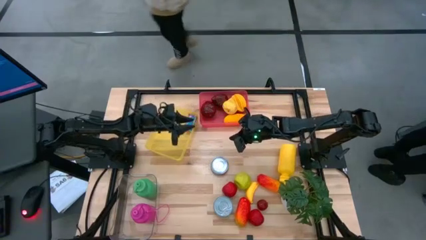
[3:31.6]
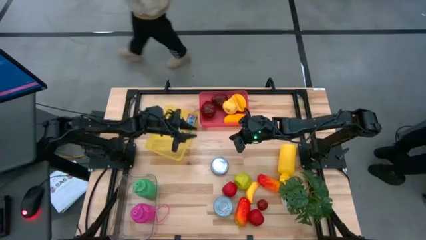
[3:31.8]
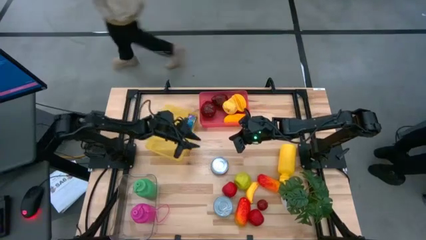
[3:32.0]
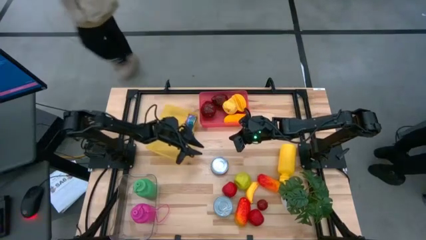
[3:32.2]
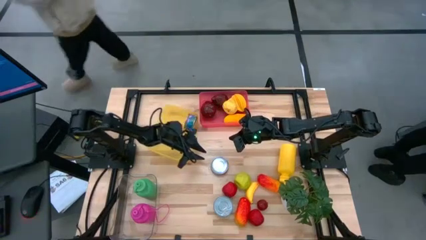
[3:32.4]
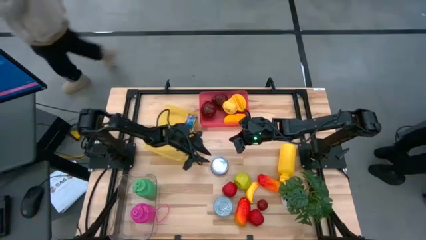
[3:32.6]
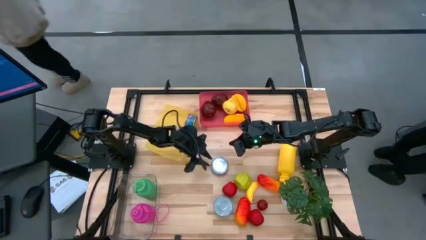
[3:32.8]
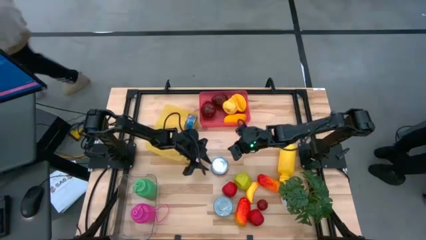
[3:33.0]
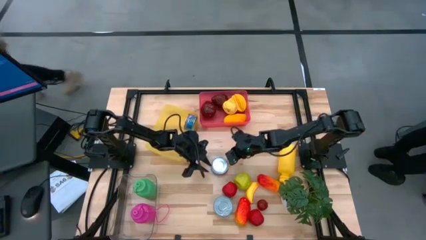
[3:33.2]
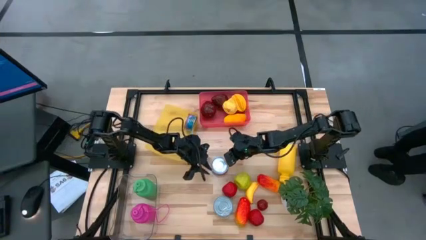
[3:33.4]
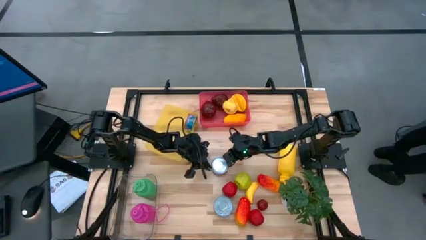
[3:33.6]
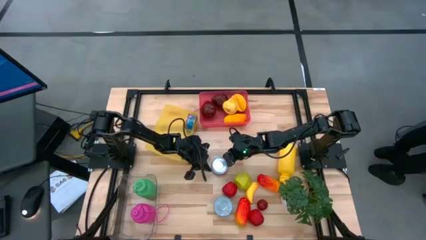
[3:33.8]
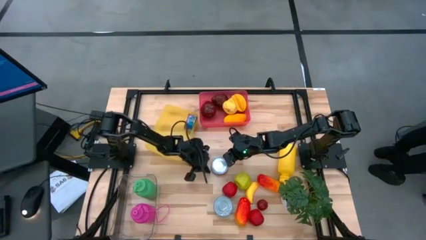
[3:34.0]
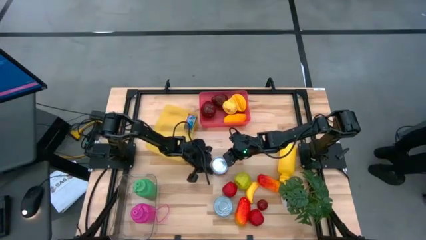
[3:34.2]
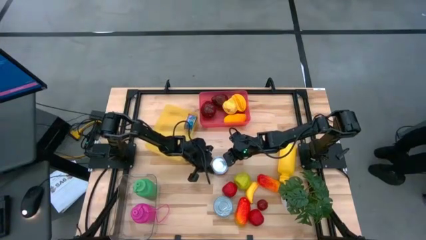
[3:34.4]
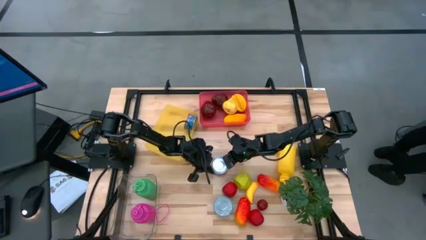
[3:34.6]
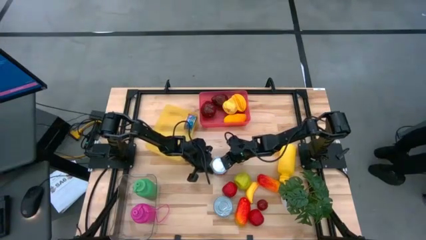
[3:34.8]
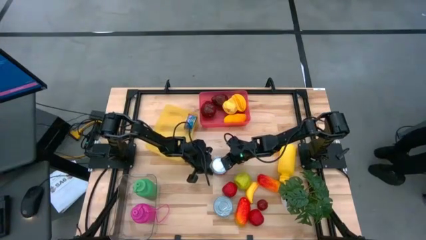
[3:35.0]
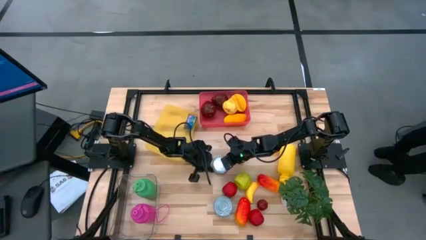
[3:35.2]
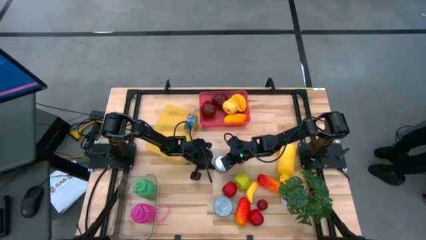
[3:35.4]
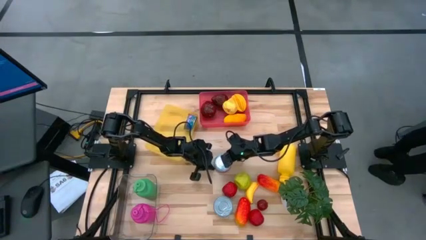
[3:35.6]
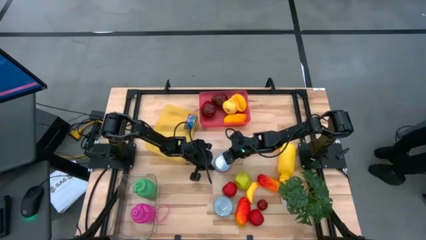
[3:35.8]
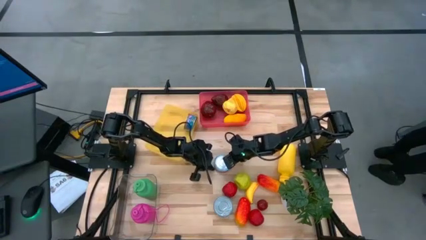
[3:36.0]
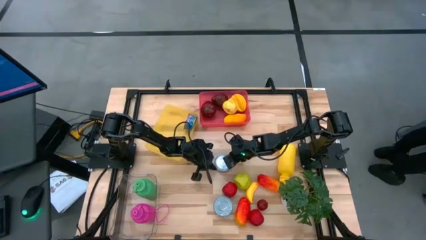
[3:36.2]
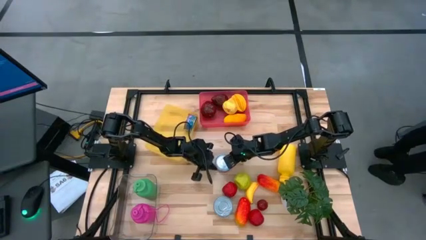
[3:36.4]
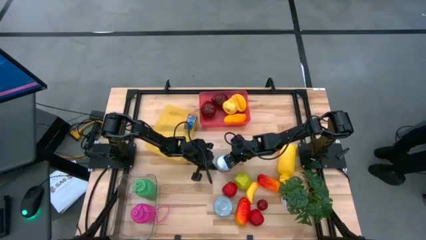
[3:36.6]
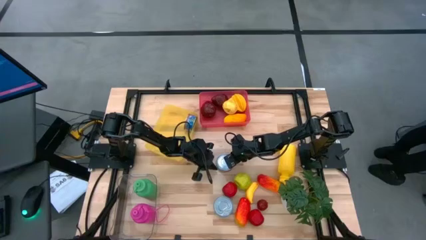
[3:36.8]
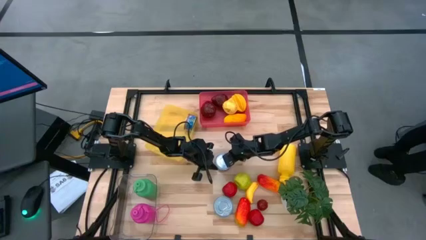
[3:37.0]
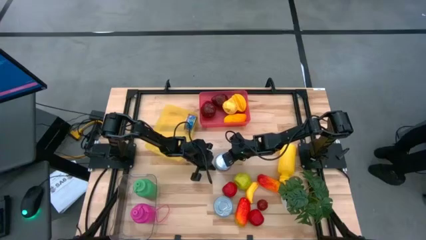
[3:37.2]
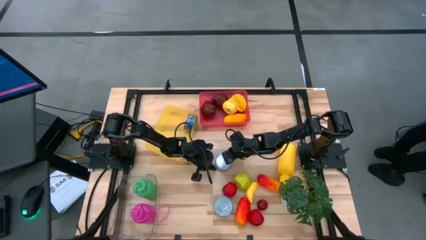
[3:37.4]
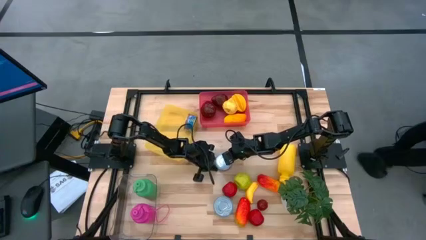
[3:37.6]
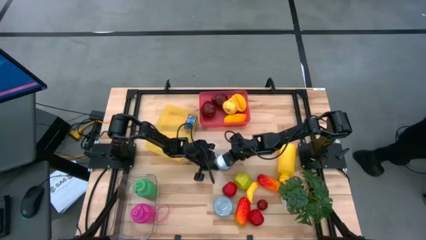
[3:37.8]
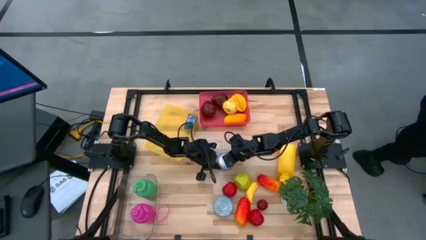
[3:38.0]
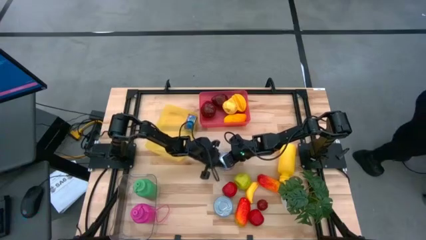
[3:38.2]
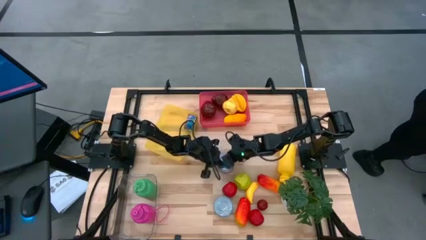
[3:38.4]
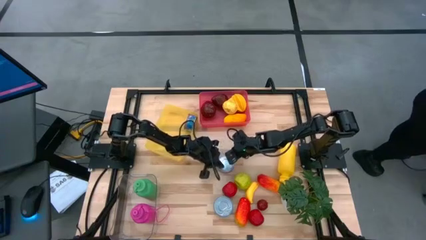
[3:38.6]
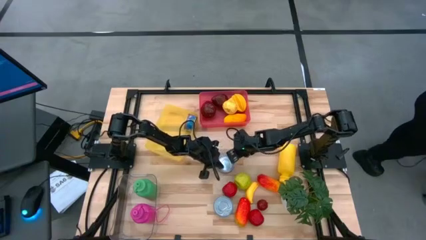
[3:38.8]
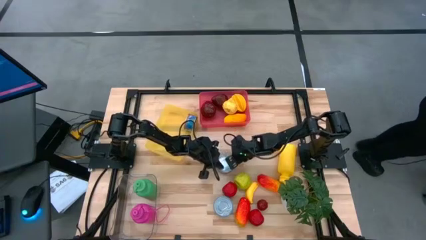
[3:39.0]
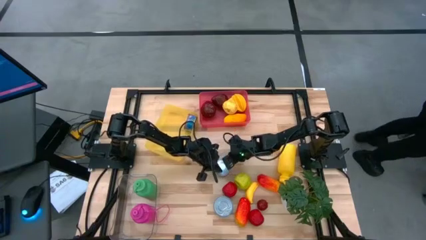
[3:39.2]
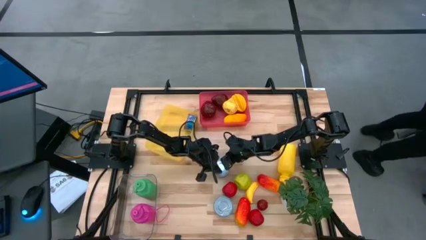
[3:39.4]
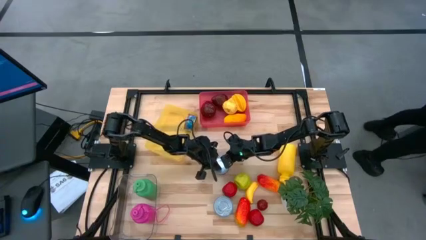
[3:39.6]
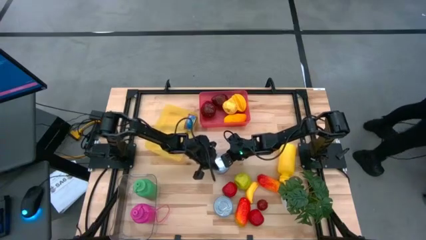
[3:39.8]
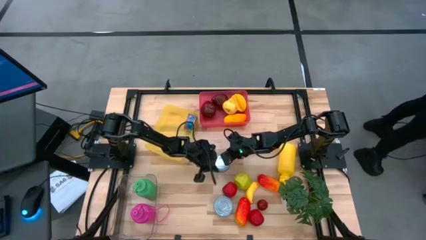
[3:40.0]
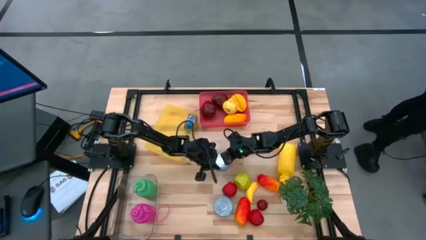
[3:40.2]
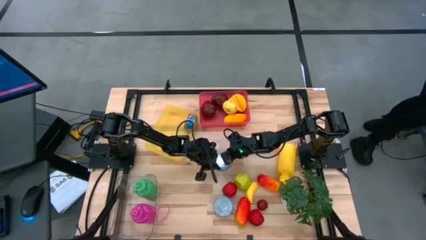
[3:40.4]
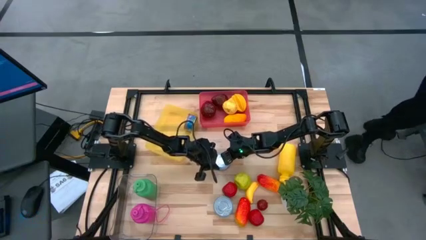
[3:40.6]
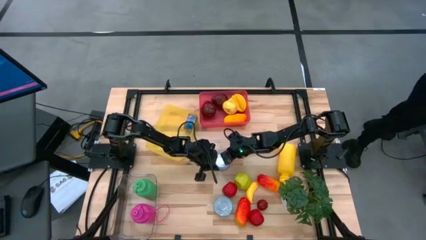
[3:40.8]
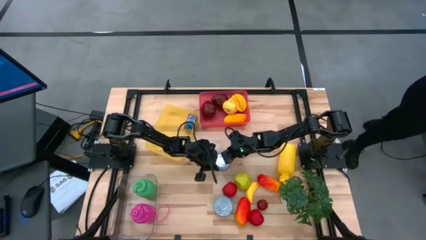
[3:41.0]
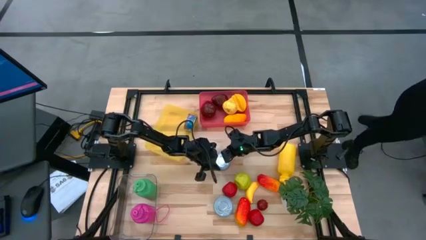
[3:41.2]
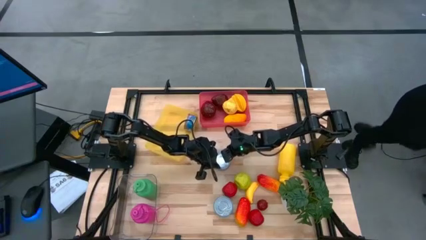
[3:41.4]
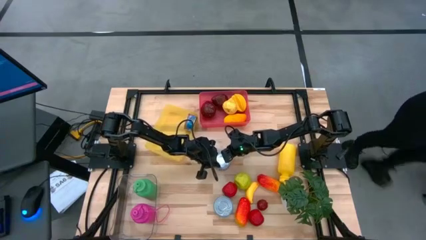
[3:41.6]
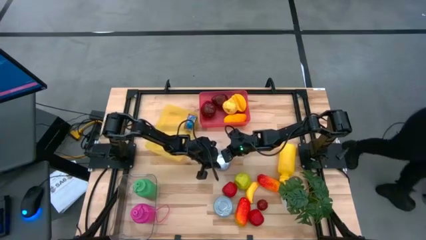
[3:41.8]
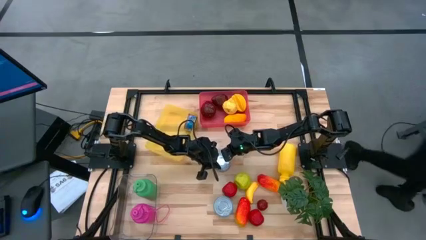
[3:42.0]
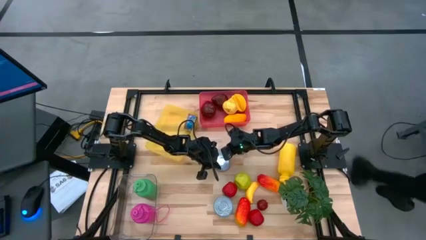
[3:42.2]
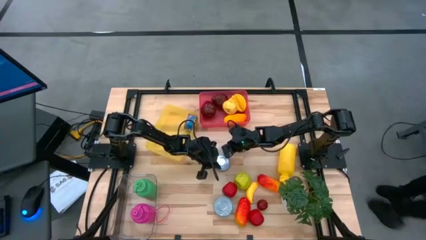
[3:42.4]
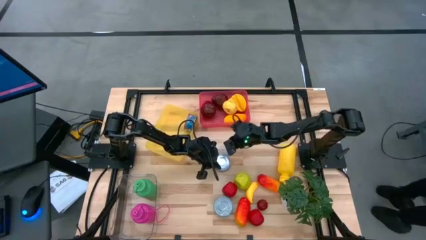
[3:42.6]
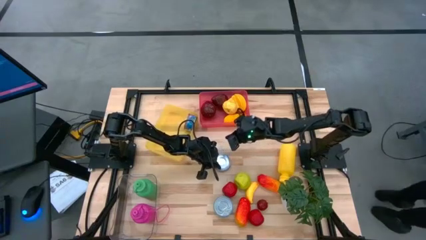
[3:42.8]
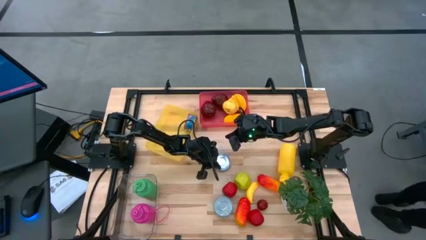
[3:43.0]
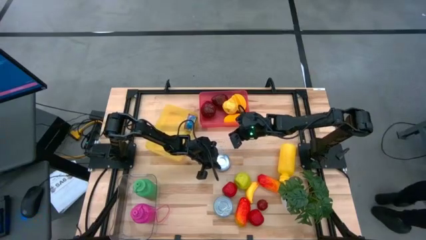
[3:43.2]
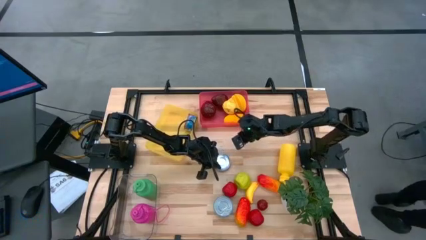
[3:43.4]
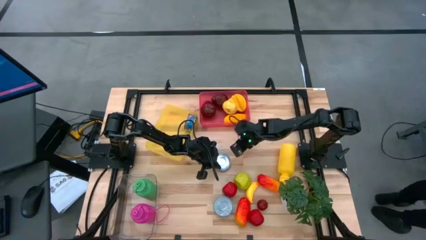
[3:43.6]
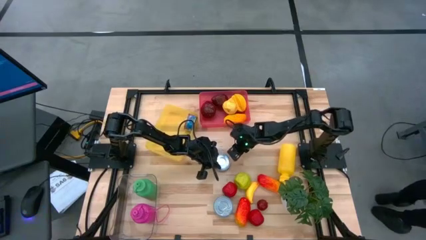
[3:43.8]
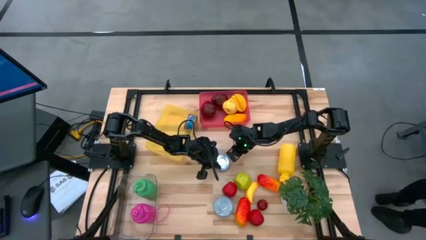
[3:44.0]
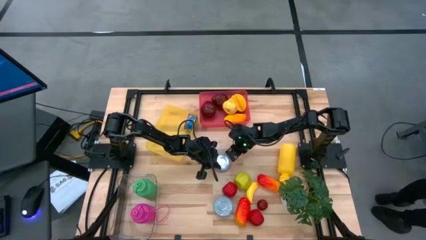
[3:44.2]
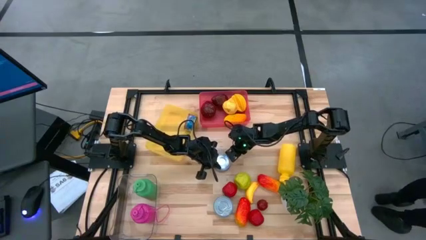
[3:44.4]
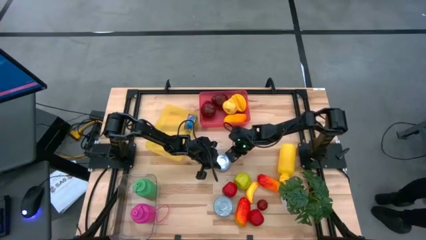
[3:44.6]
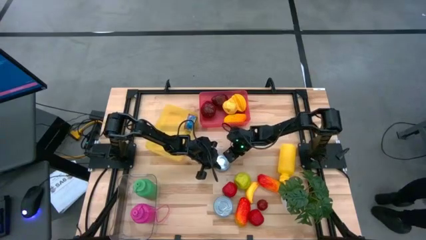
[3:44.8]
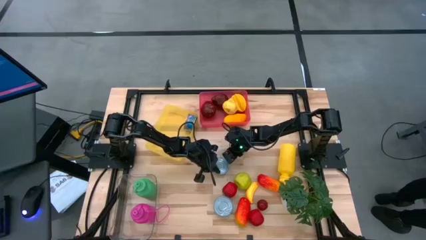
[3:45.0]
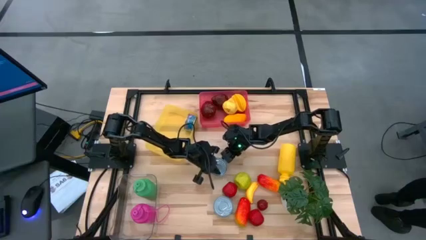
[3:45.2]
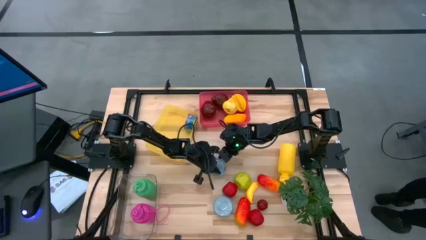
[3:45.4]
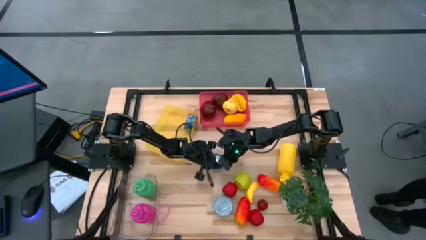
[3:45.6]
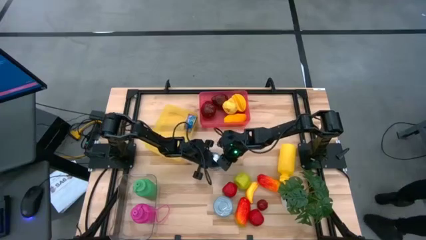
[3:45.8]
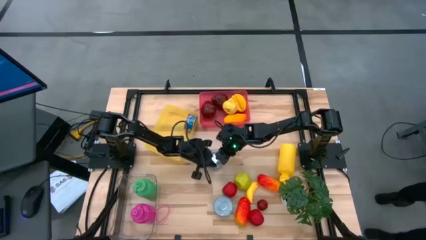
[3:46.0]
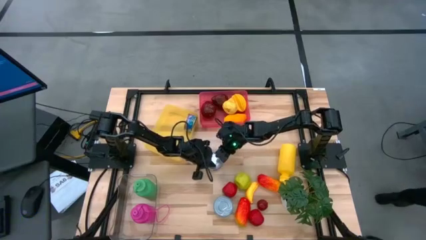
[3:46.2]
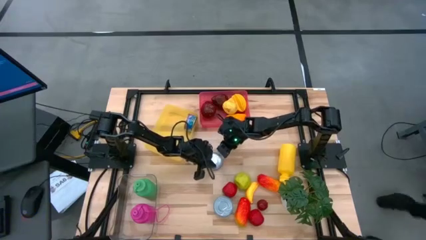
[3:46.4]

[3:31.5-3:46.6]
Task: Pick & Place Food Item
Put the red tuna can into the yellow bin
